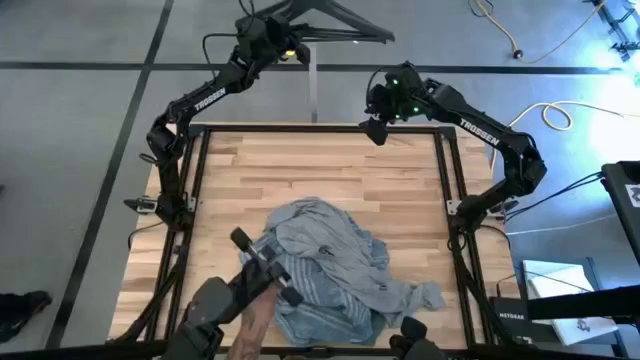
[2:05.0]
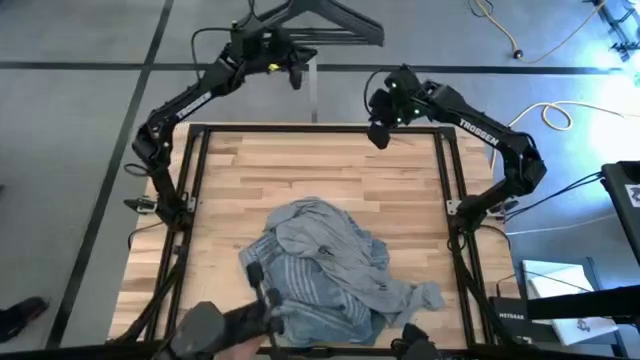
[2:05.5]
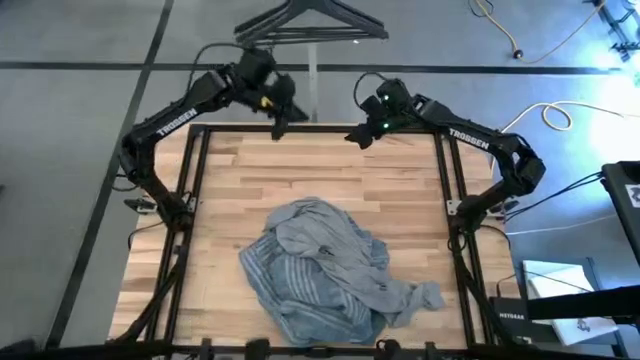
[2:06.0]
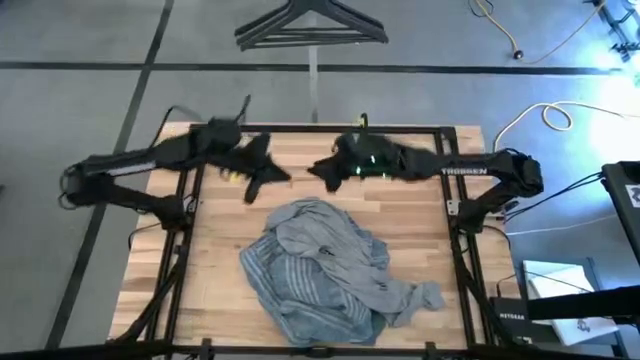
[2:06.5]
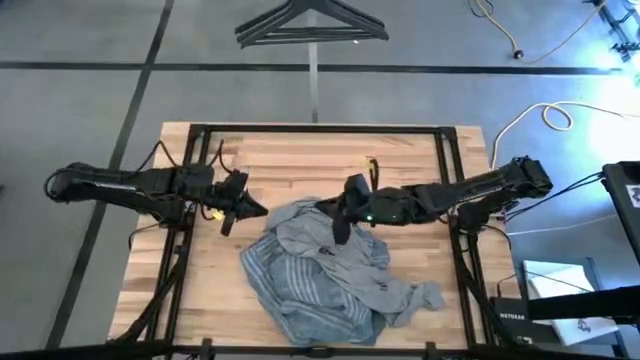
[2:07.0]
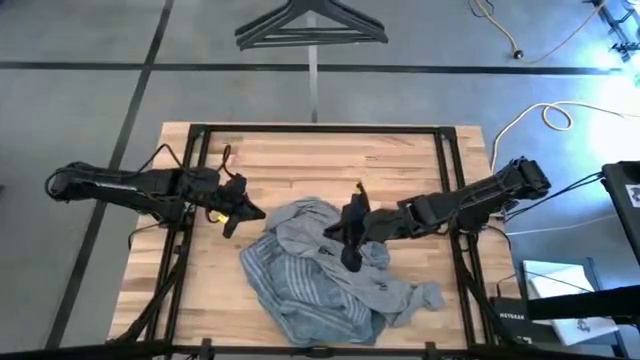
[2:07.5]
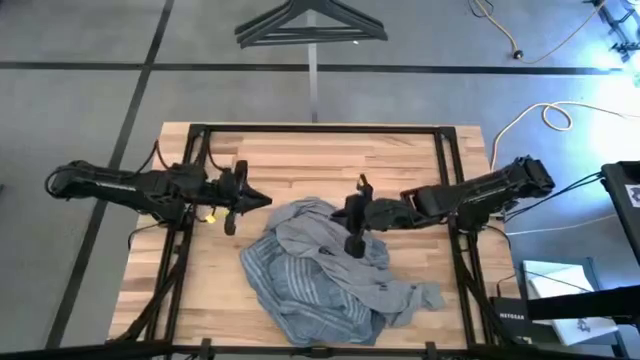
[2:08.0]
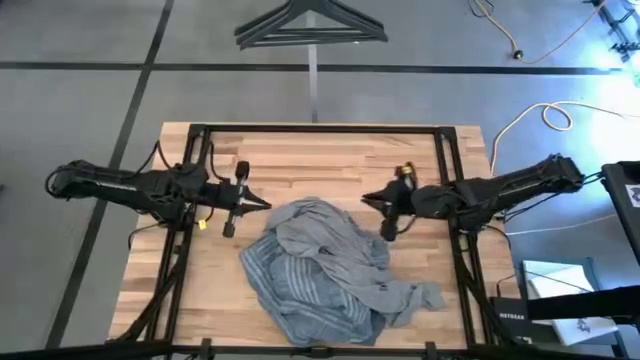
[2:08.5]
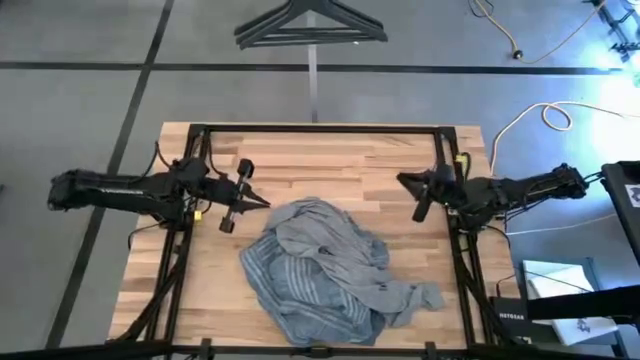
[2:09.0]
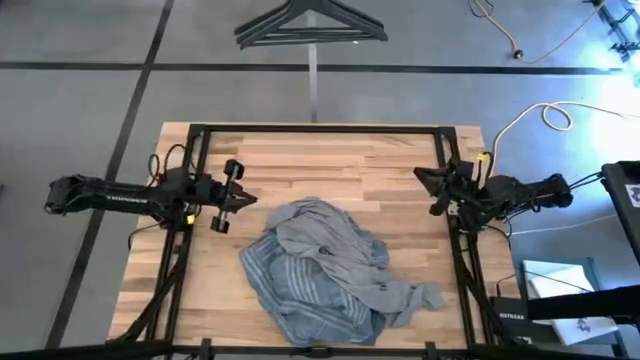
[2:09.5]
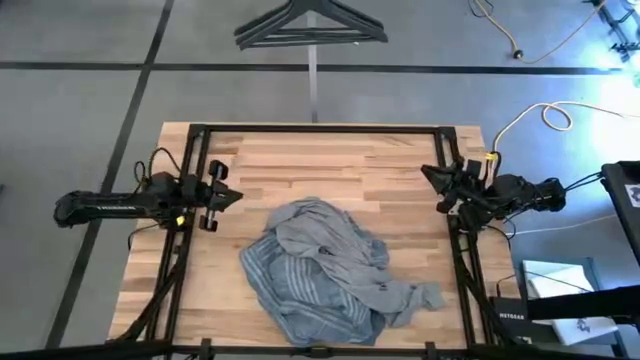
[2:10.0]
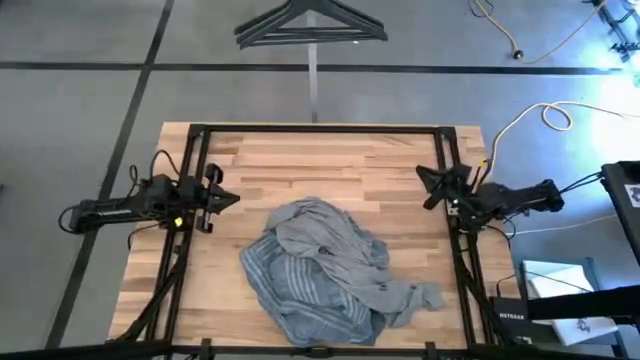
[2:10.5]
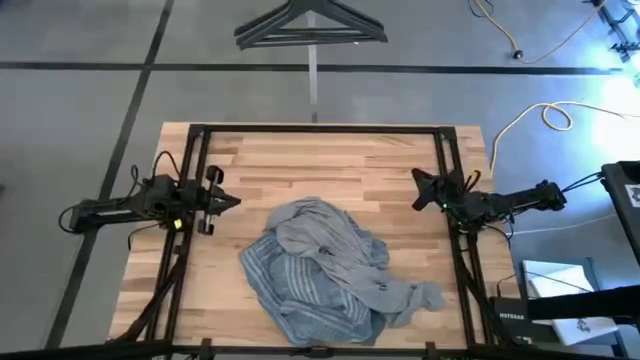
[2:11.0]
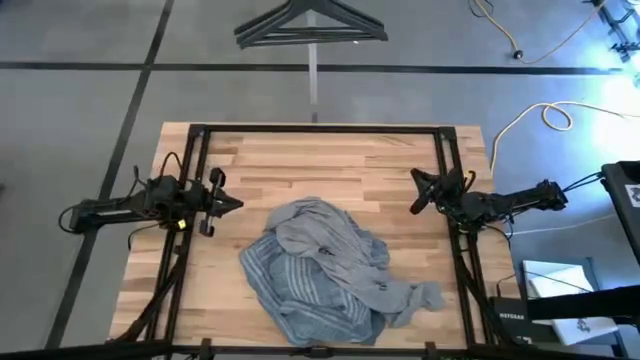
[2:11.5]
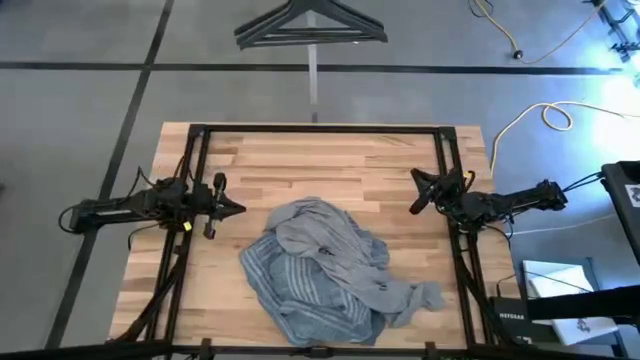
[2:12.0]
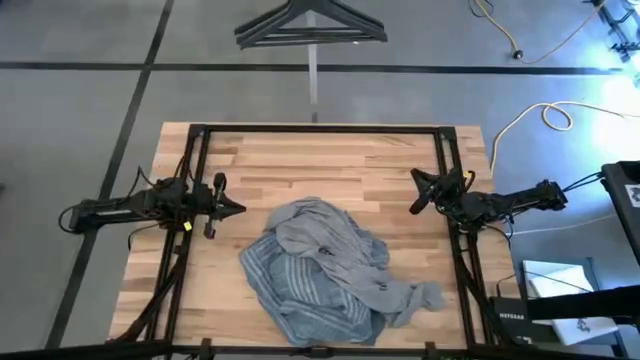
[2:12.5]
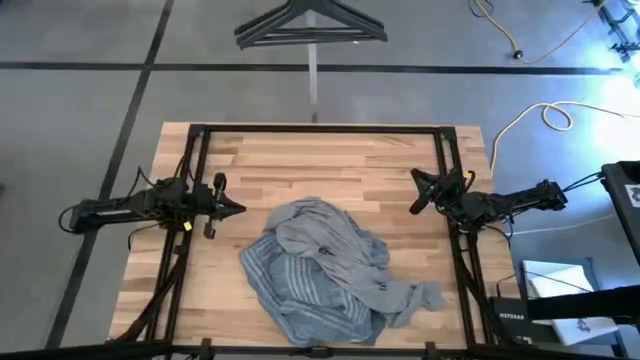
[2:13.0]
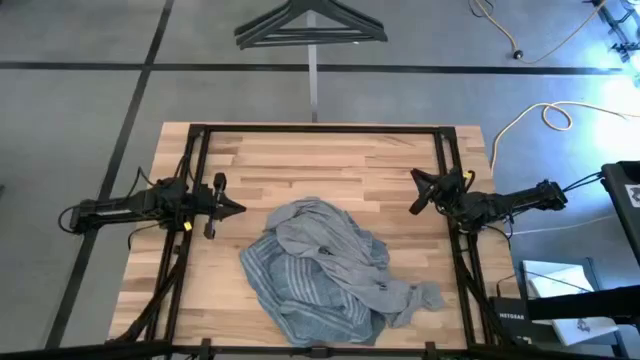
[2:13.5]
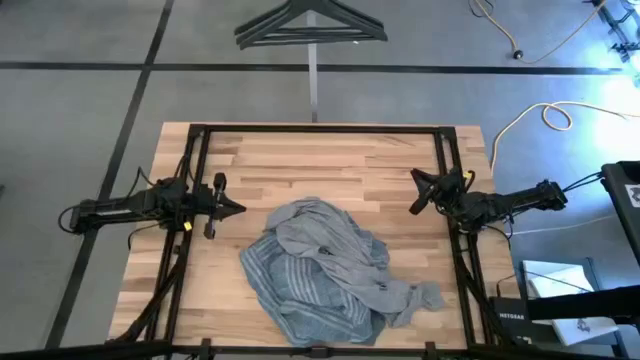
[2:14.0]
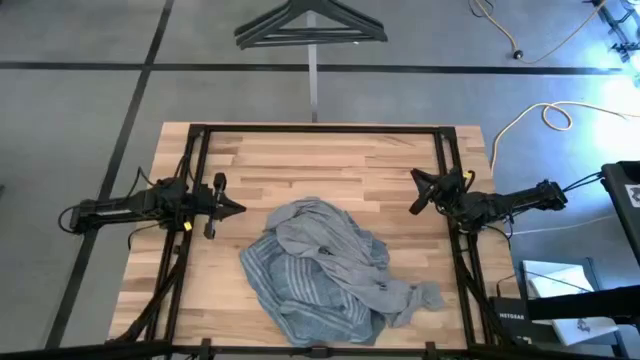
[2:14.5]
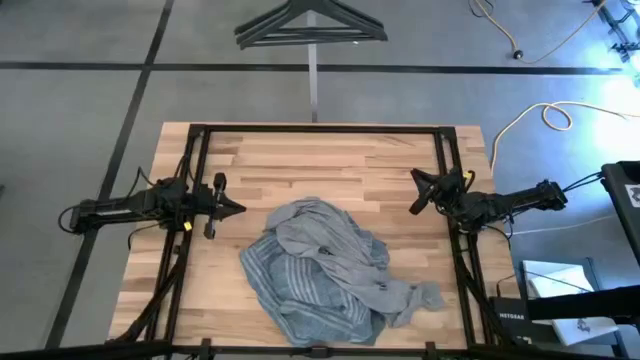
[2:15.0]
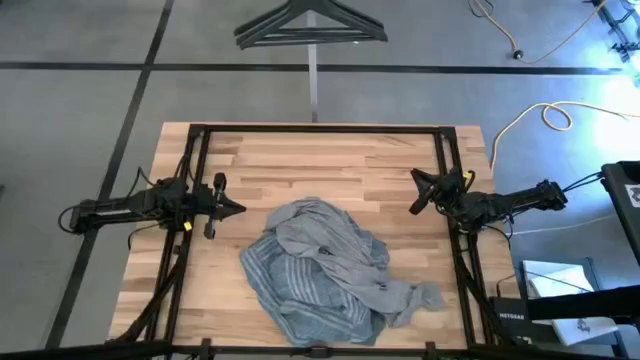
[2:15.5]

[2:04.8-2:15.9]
Task: Unhang clothes
Return to Home Position

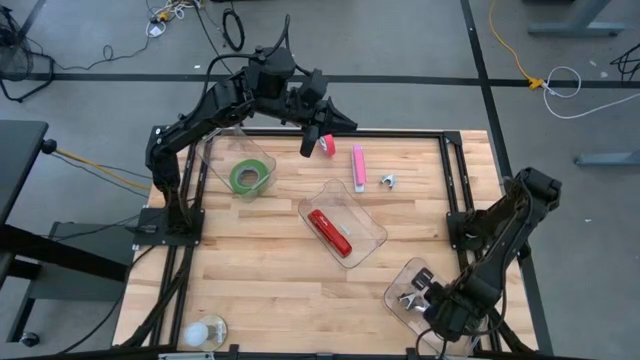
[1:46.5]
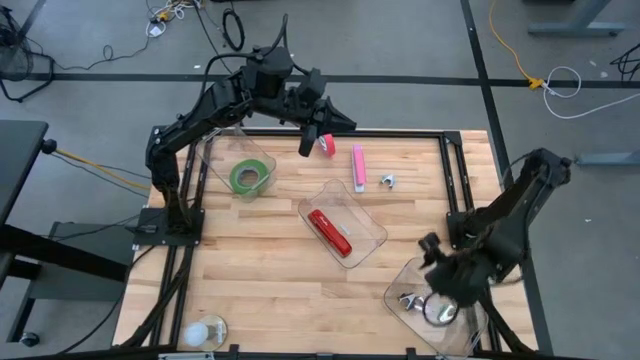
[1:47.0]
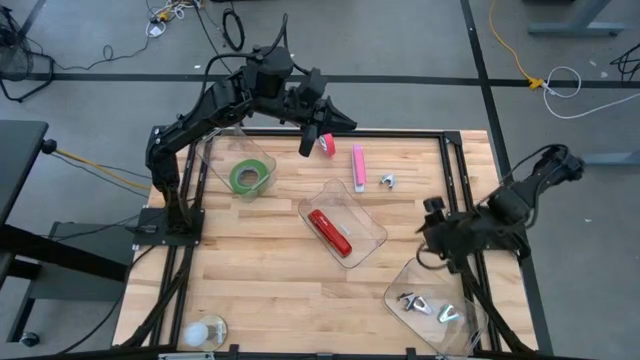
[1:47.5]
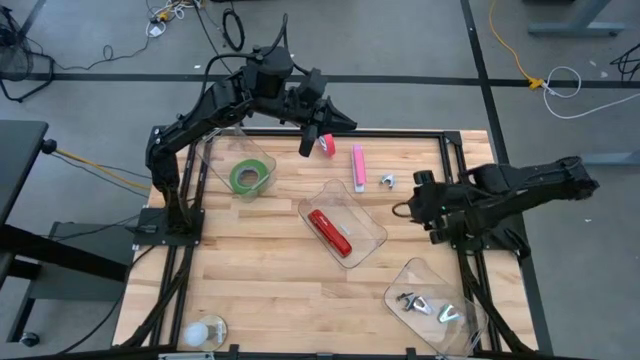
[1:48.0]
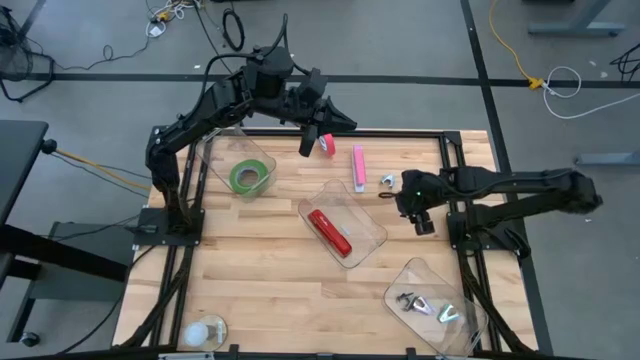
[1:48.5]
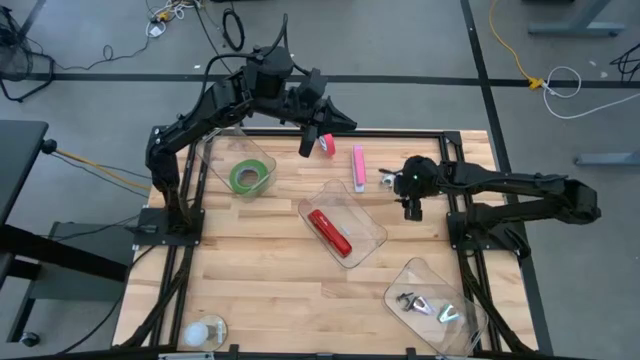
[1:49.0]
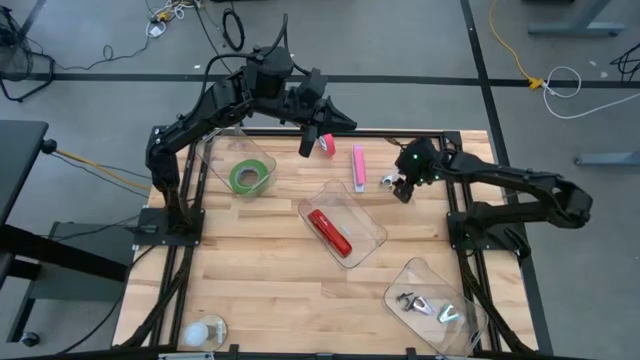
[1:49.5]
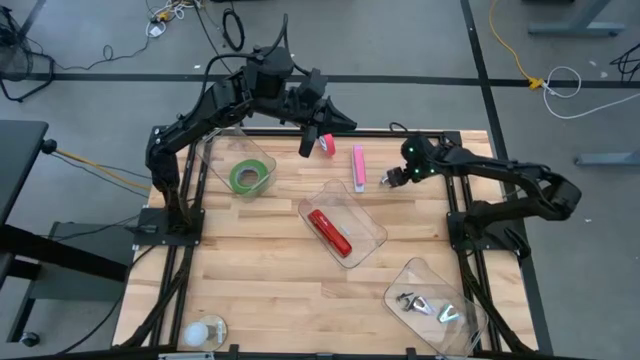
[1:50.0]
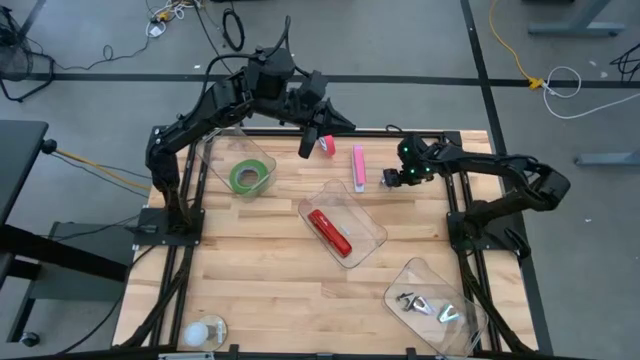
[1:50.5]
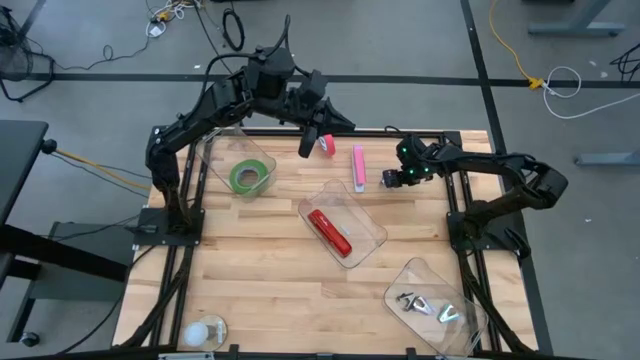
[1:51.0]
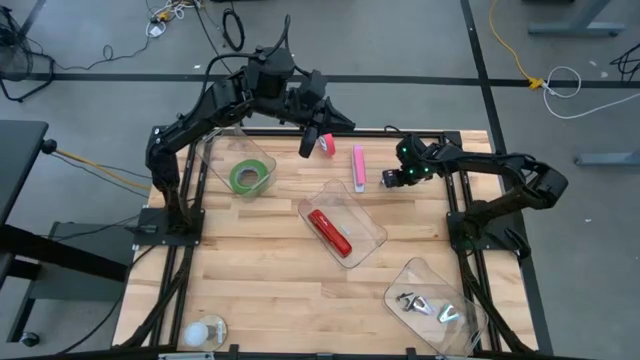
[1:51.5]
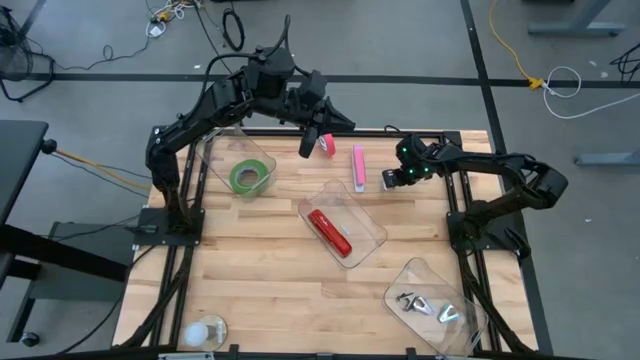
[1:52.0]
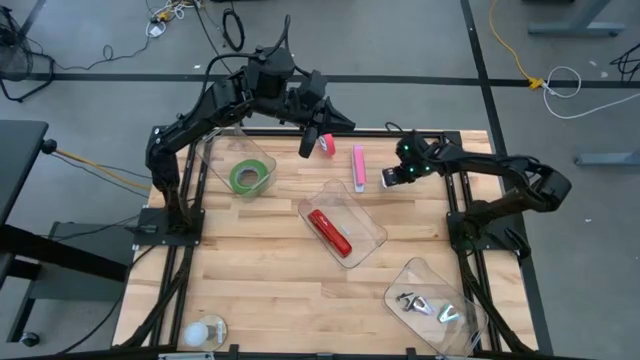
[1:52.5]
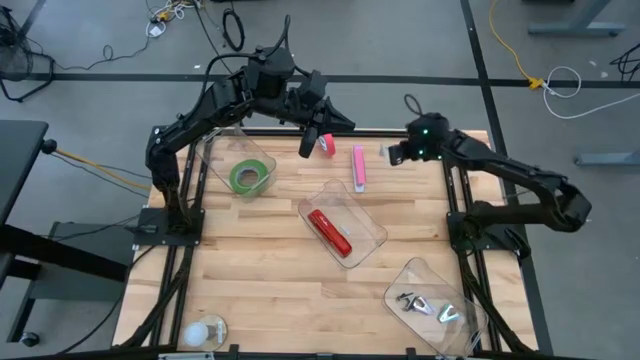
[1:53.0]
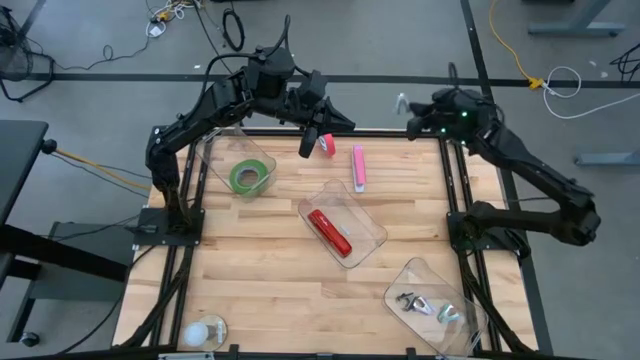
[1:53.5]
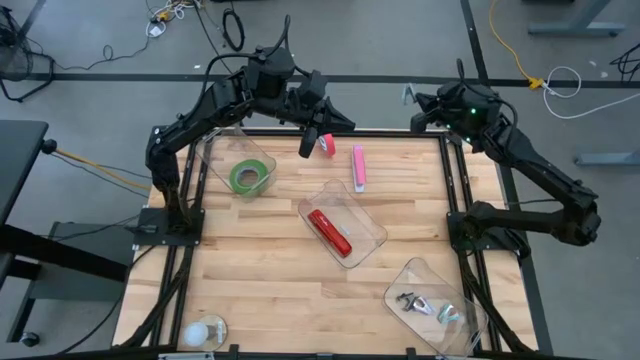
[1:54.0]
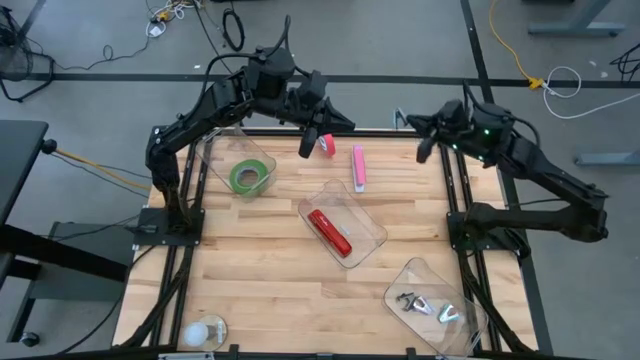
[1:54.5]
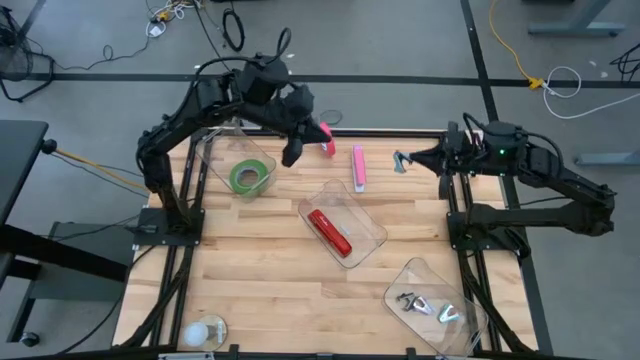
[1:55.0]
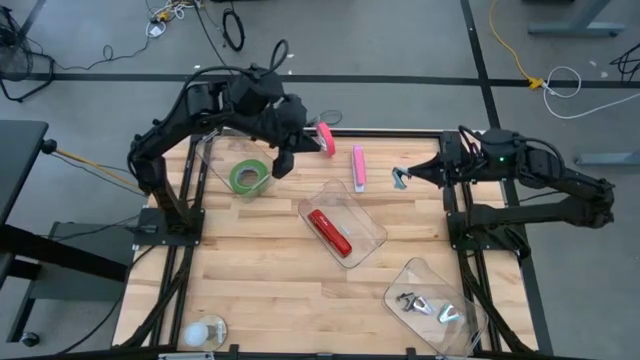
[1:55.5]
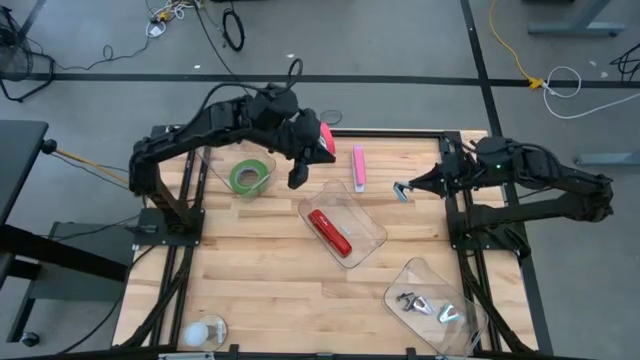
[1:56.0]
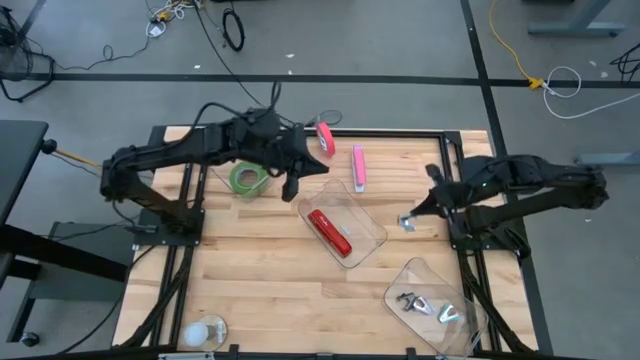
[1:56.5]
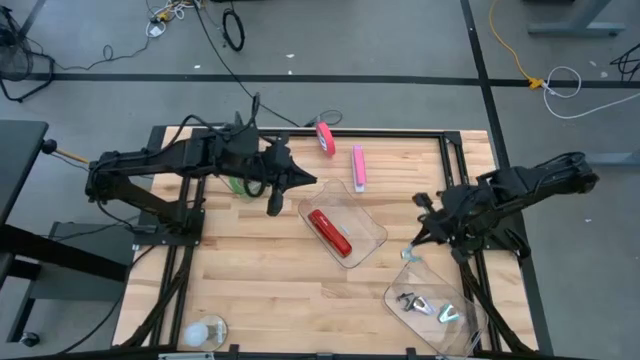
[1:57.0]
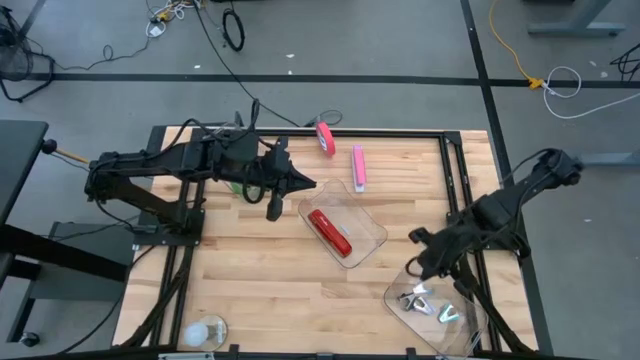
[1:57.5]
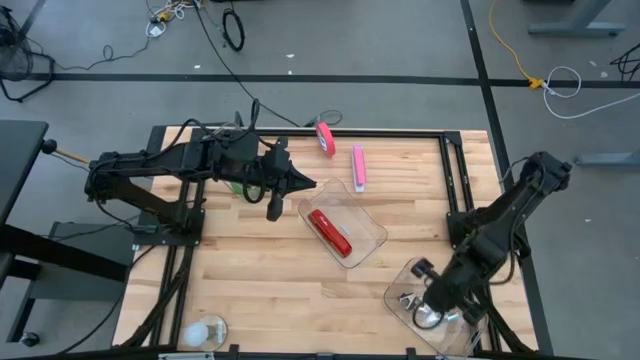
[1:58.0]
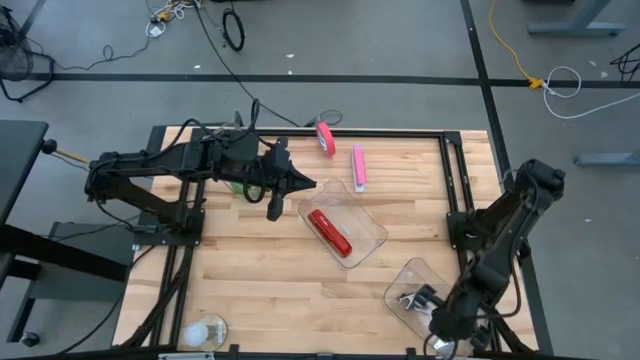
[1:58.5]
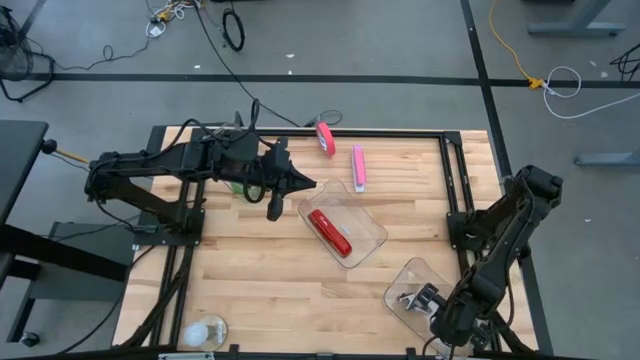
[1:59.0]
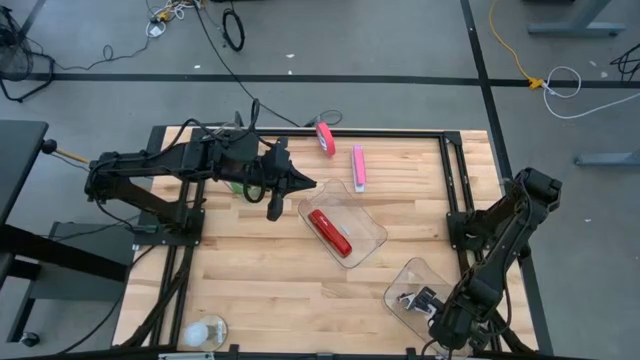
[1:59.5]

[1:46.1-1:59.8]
Task: Pick and place Stapler, Stapler remover, tape
Put the sky blue staple remover into the bottom transparent bin
